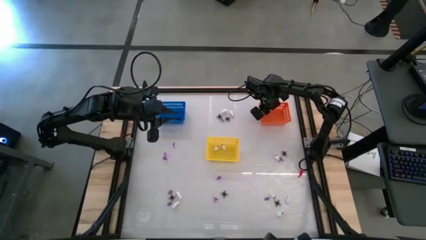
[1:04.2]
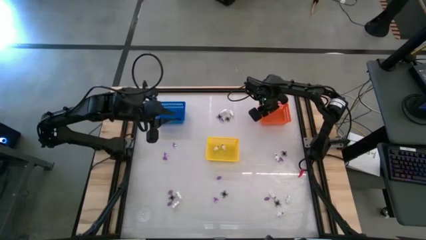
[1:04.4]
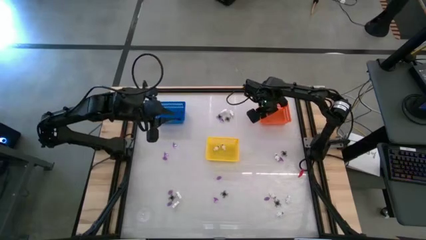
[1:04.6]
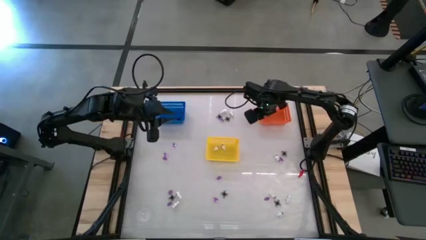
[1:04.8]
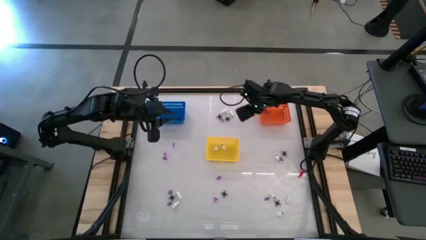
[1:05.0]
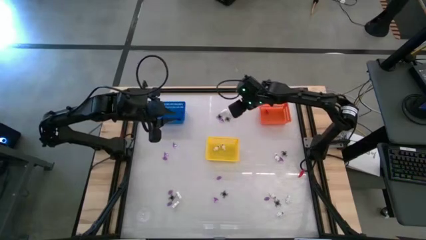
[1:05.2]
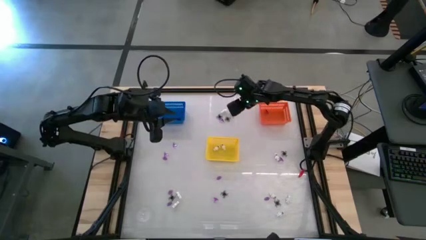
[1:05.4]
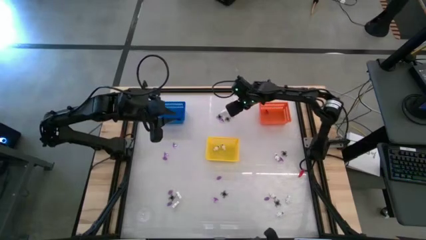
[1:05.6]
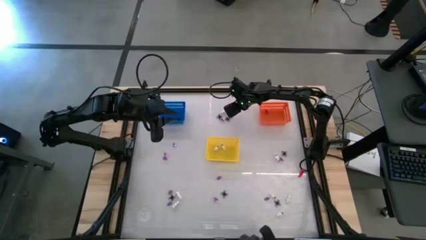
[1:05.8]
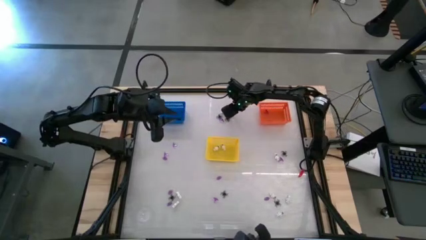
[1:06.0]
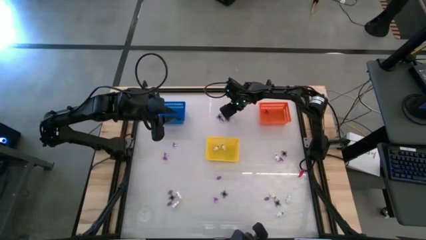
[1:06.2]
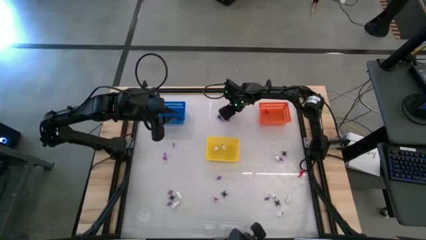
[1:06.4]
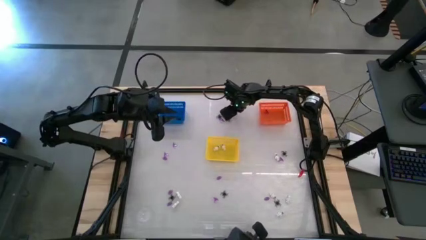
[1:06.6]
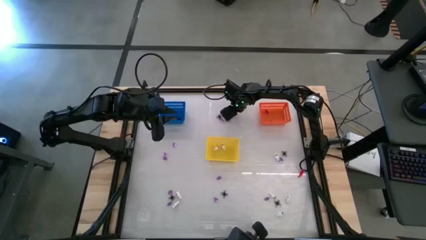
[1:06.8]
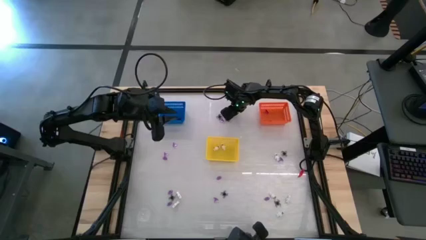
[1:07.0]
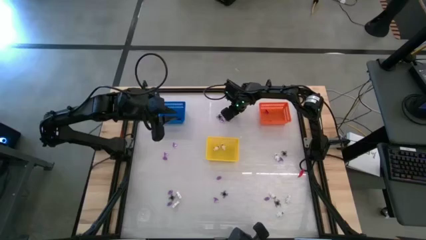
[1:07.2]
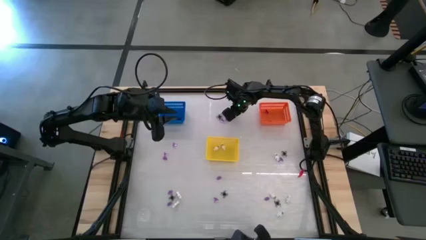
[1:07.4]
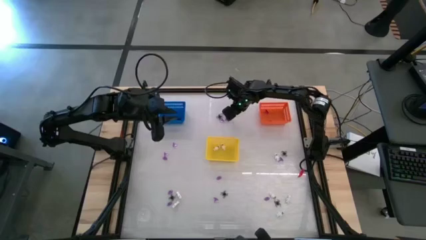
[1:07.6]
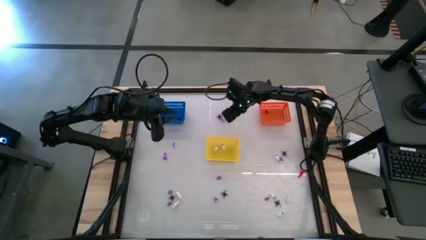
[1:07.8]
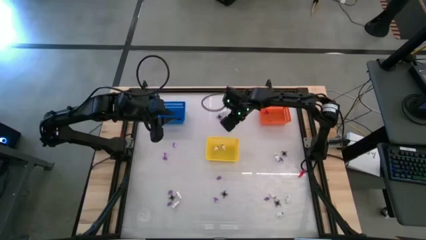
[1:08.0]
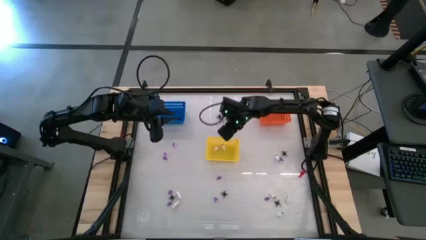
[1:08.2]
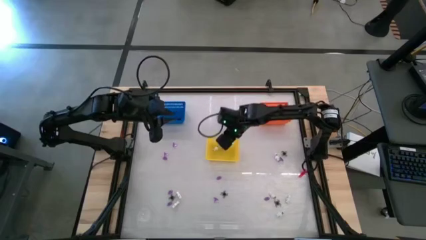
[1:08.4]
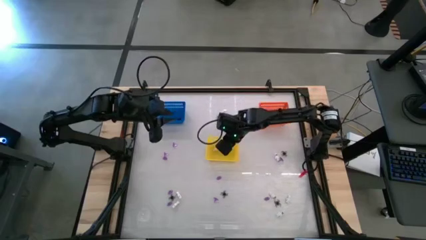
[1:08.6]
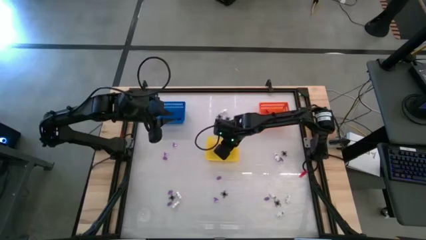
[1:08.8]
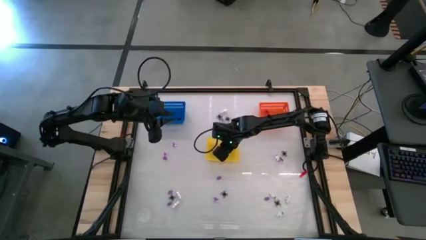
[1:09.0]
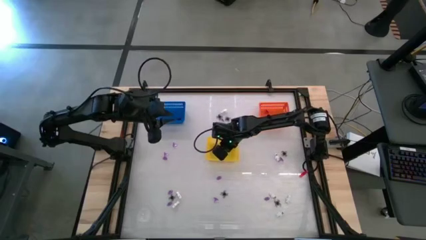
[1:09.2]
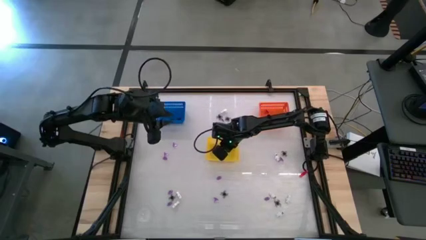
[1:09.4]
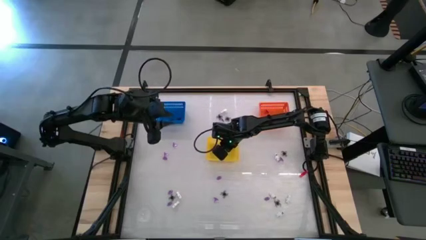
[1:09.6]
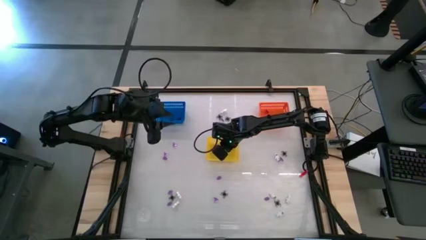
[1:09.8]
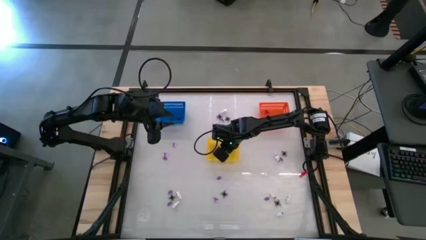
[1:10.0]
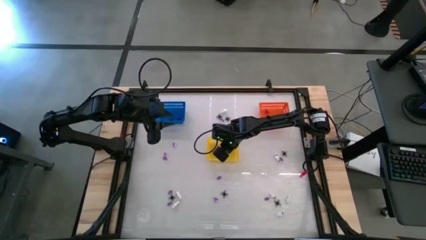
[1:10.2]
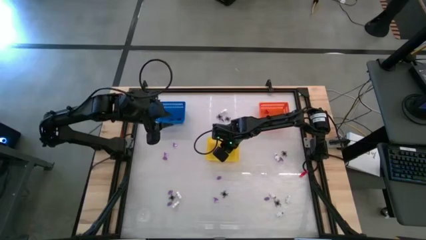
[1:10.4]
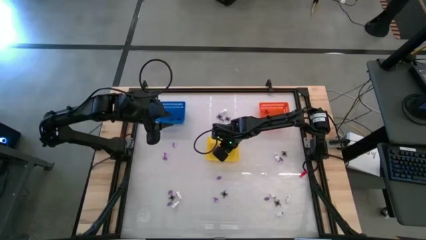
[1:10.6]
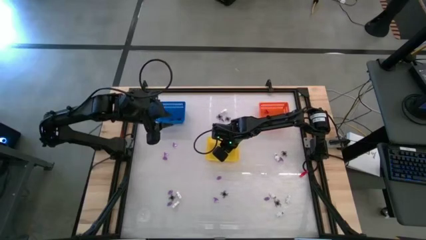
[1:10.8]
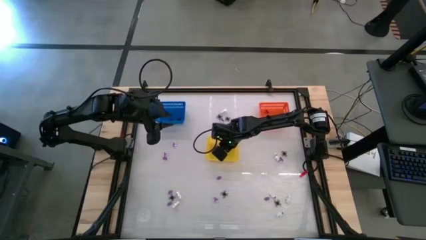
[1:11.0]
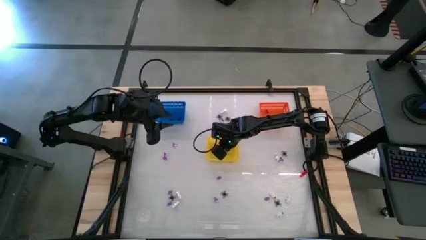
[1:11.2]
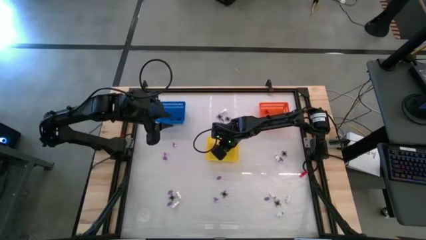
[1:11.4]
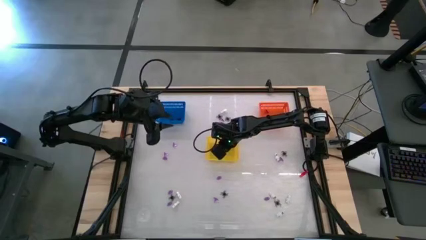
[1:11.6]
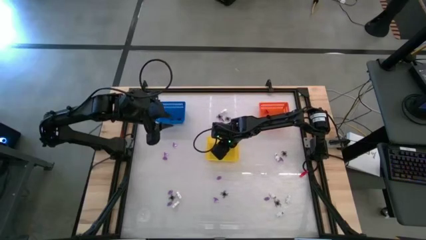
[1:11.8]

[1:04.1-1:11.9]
Task: Sort Halloween decoration
Put the white skeleton toy into the yellow bin

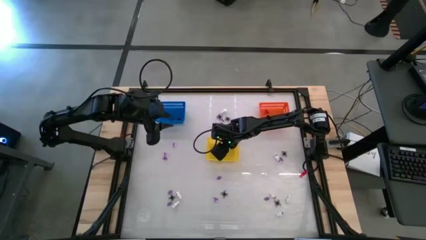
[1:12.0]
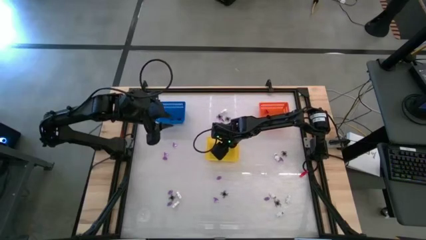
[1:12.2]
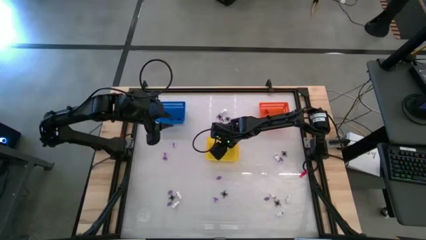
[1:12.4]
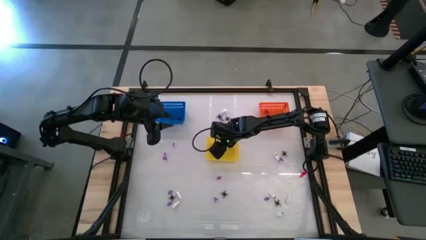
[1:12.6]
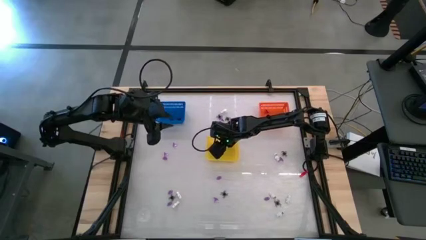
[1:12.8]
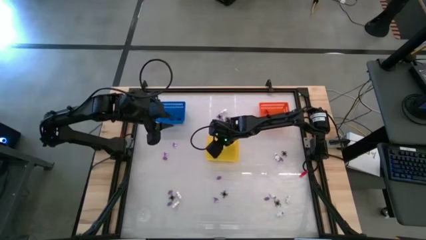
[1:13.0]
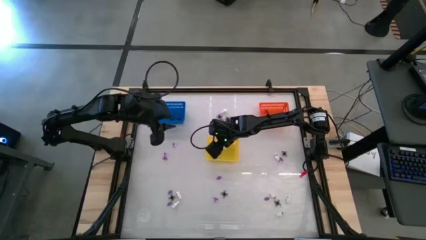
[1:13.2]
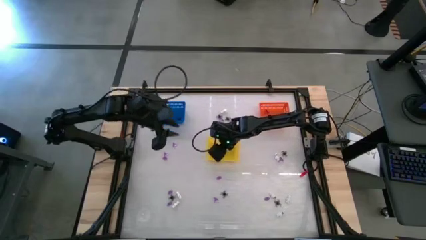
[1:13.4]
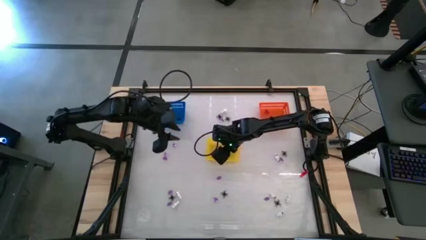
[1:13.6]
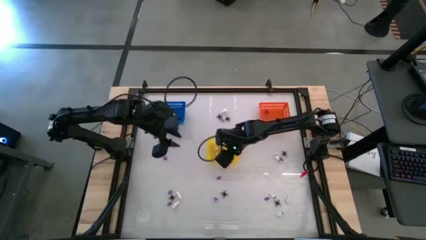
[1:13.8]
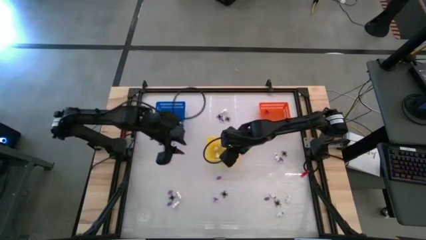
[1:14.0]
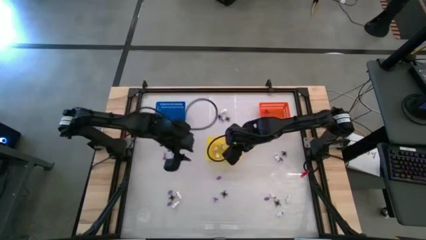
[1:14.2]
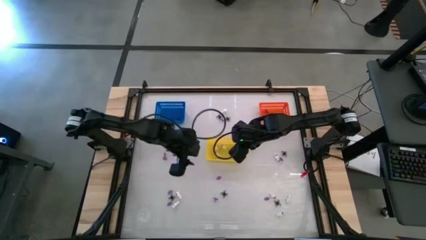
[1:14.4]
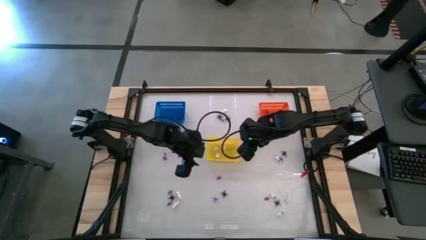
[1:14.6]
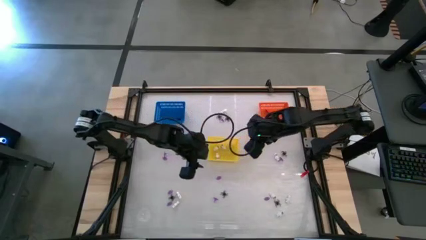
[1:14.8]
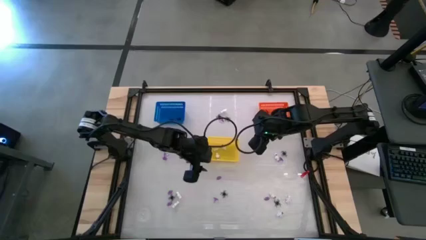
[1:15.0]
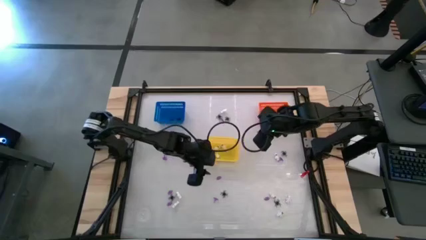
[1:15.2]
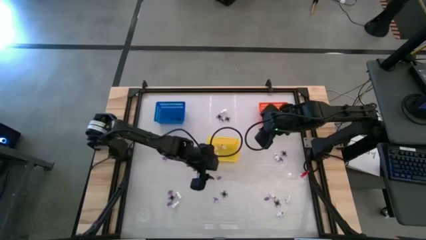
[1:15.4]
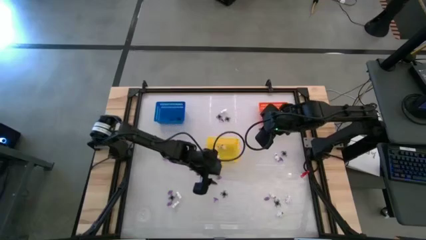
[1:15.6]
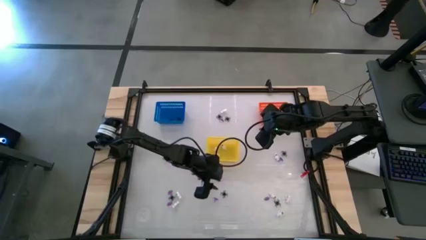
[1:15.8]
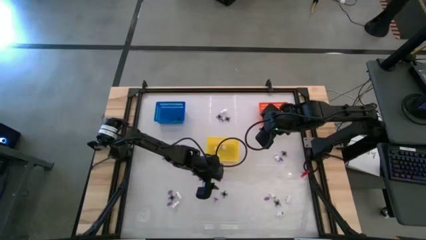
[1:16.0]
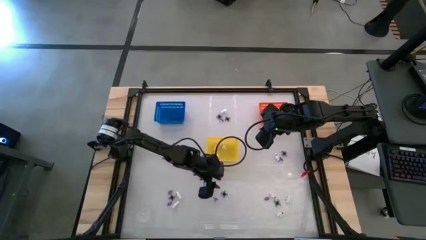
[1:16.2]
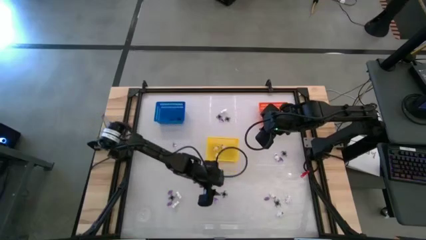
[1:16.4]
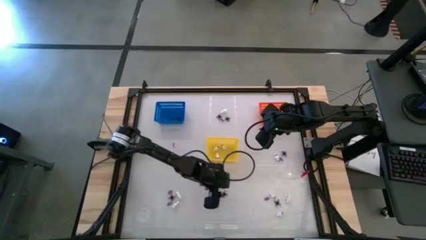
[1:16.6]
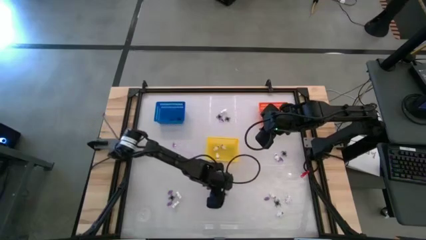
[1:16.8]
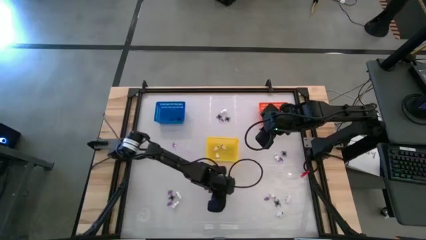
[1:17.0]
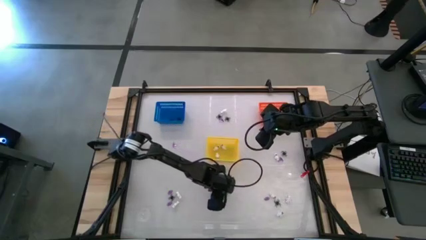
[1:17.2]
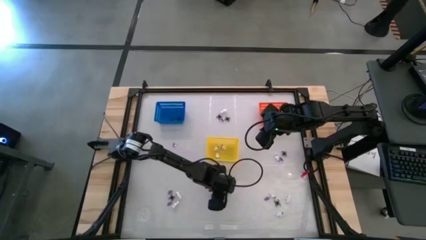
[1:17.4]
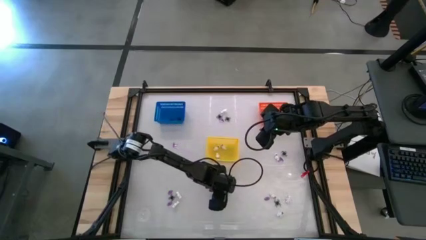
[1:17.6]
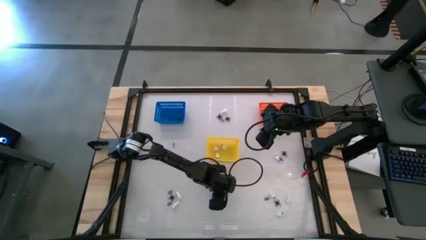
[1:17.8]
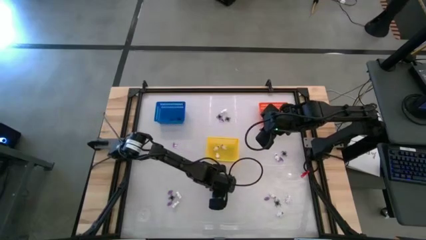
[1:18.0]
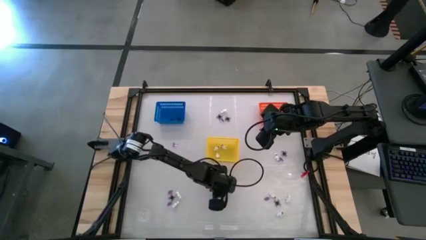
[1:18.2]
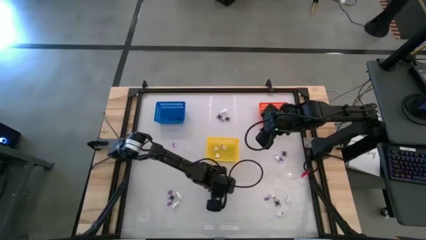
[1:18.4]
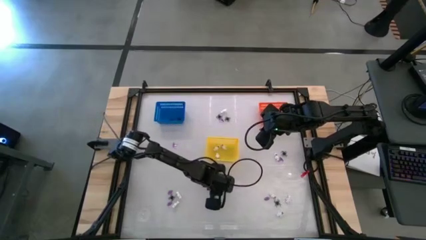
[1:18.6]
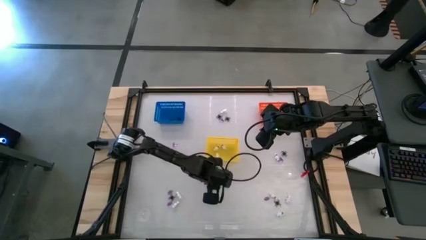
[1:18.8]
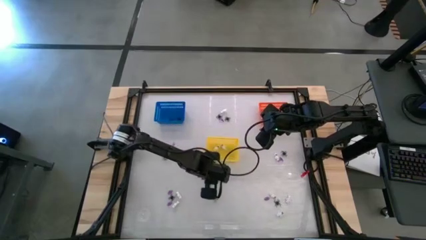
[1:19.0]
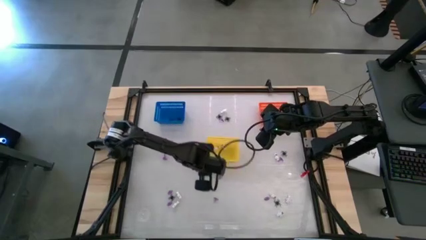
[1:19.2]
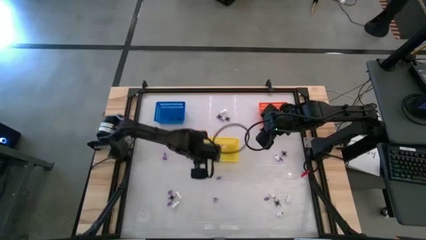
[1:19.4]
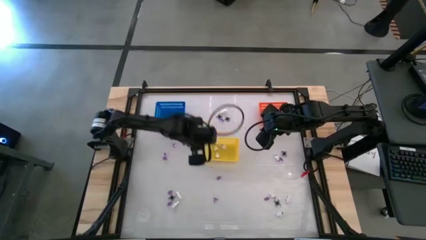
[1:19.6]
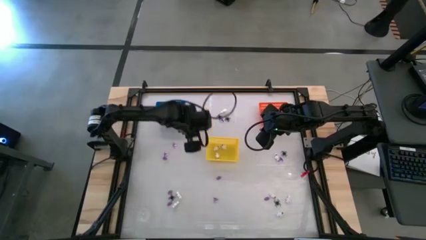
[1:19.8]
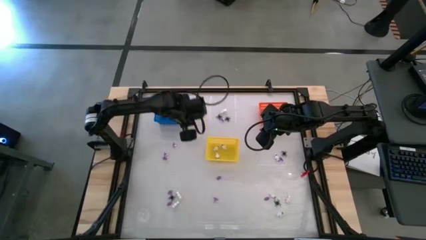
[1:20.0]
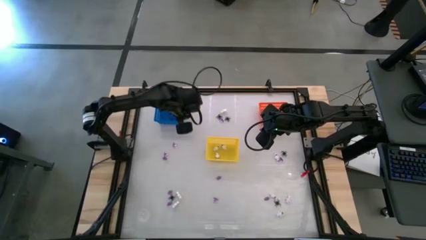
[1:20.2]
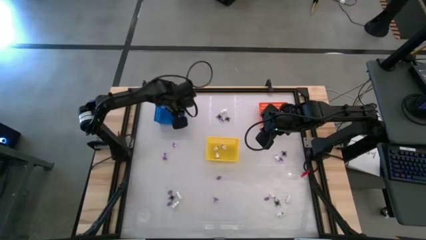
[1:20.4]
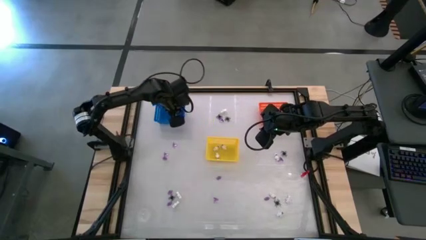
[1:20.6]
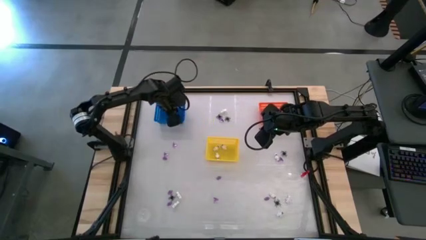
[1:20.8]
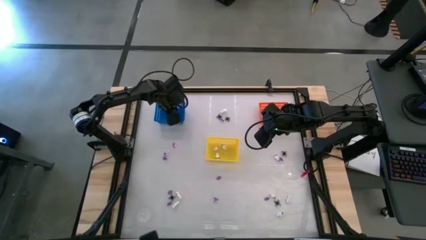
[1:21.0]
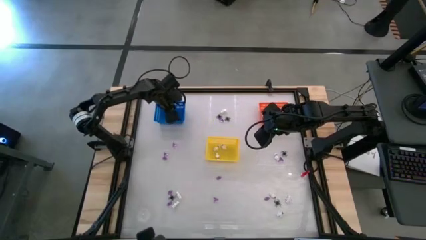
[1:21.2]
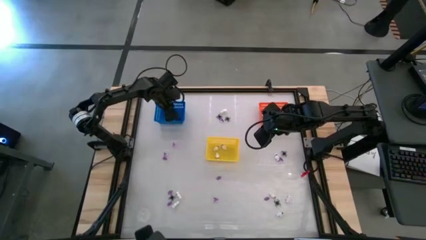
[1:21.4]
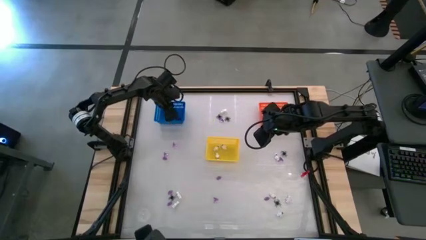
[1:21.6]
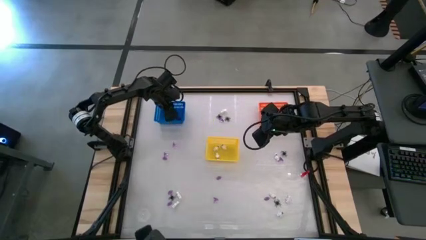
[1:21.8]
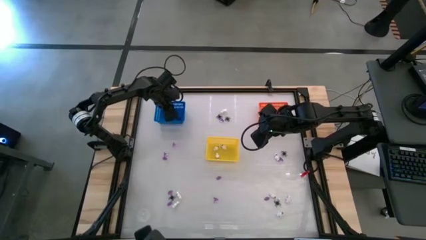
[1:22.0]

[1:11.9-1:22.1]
Put the black spider toy into the blue bin
